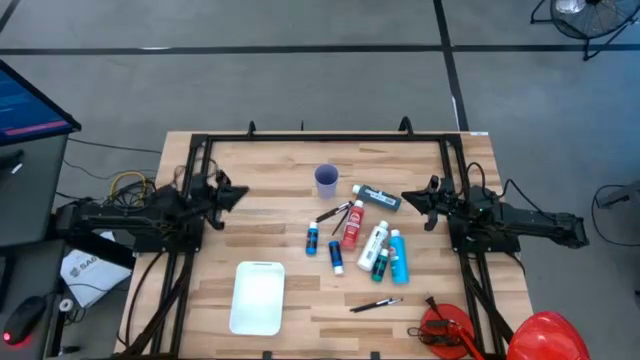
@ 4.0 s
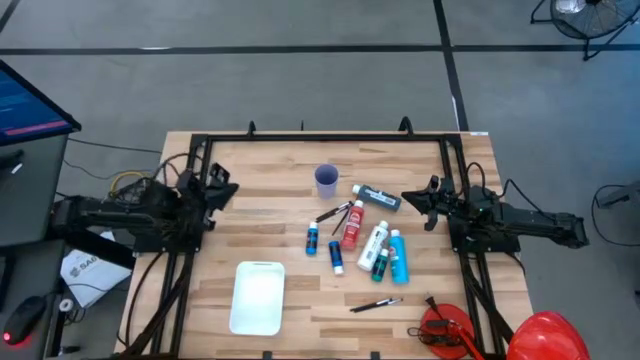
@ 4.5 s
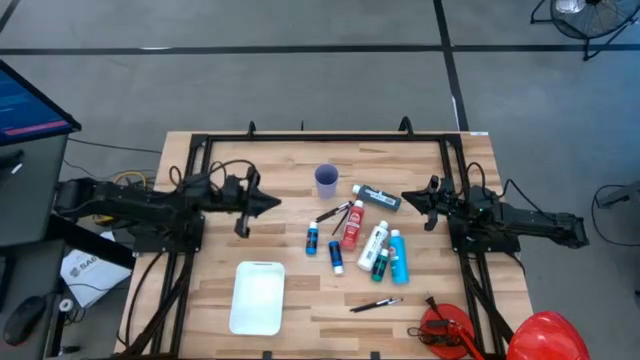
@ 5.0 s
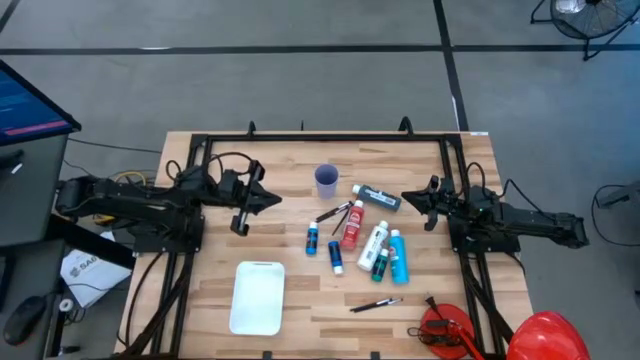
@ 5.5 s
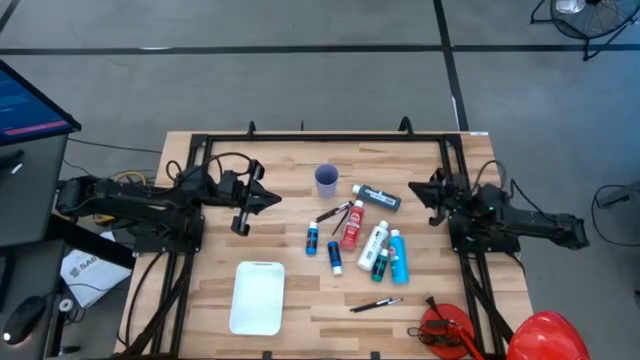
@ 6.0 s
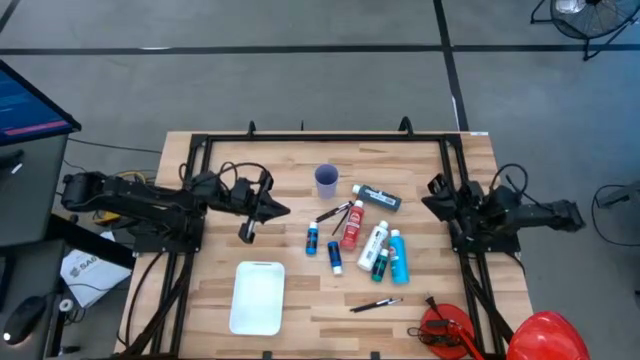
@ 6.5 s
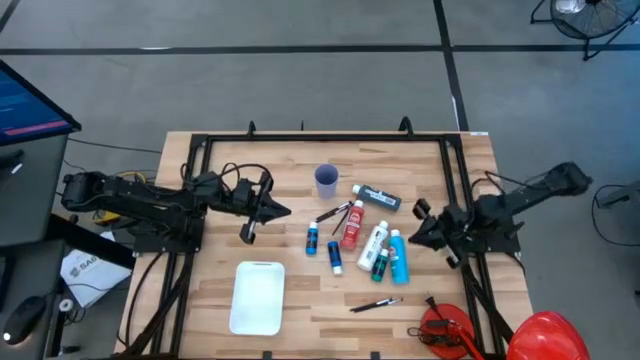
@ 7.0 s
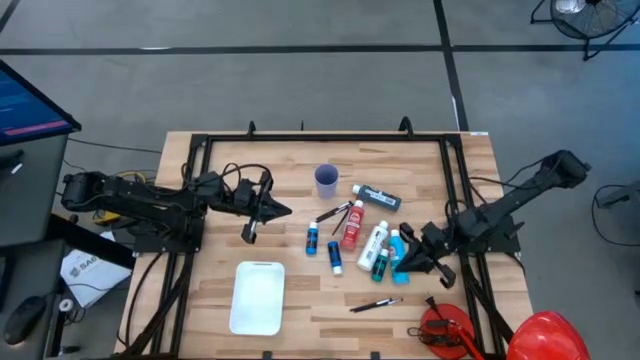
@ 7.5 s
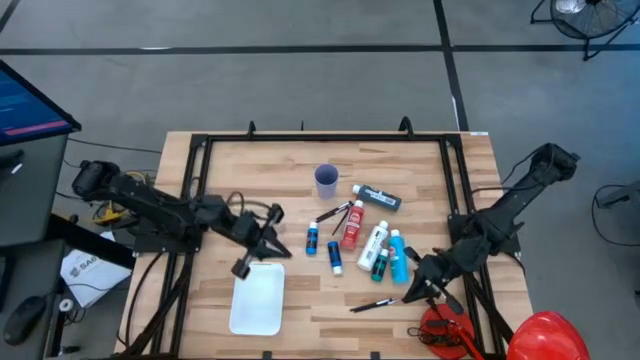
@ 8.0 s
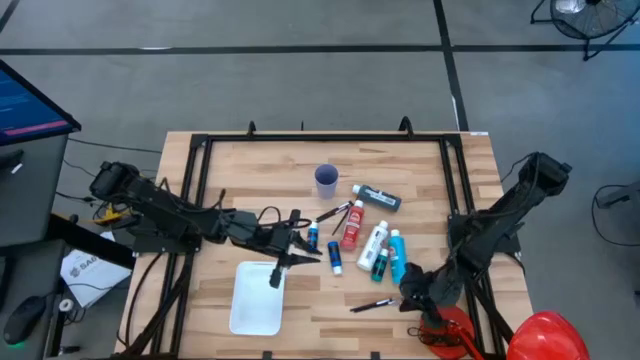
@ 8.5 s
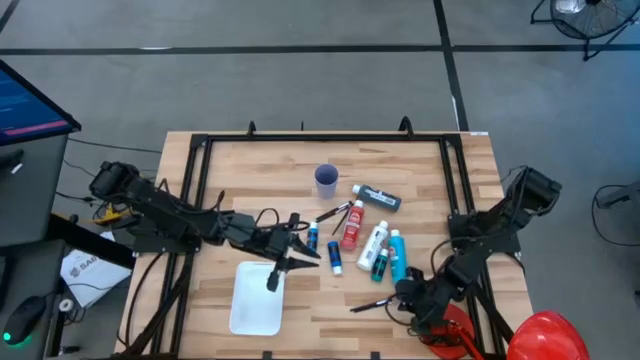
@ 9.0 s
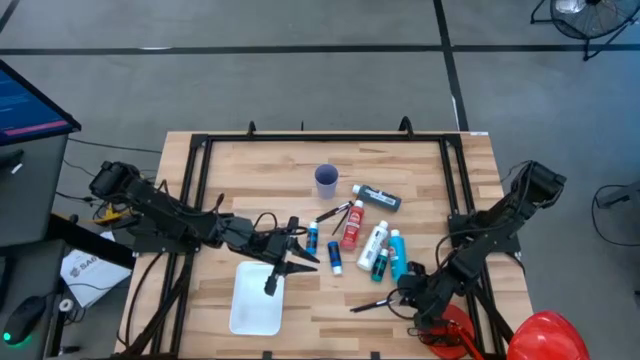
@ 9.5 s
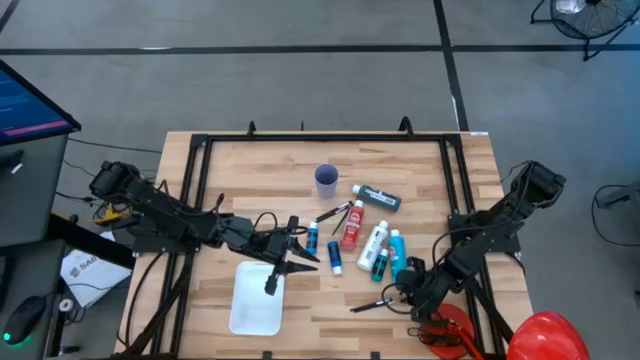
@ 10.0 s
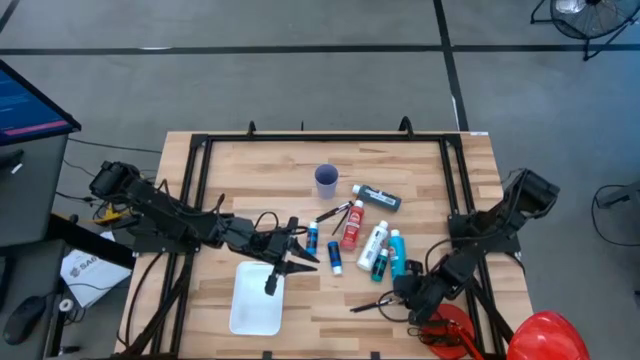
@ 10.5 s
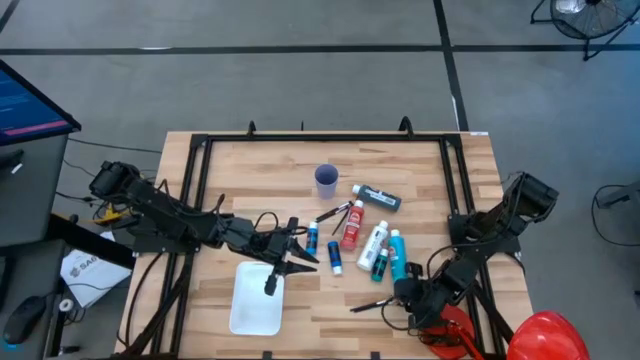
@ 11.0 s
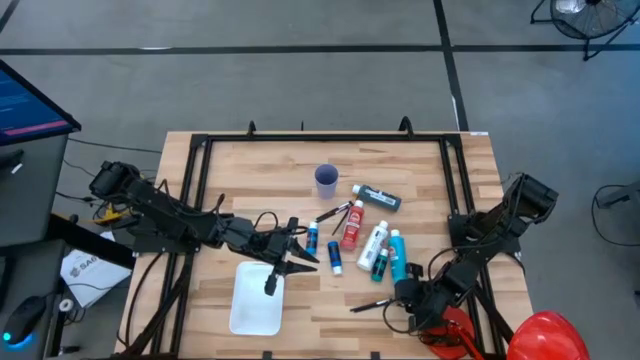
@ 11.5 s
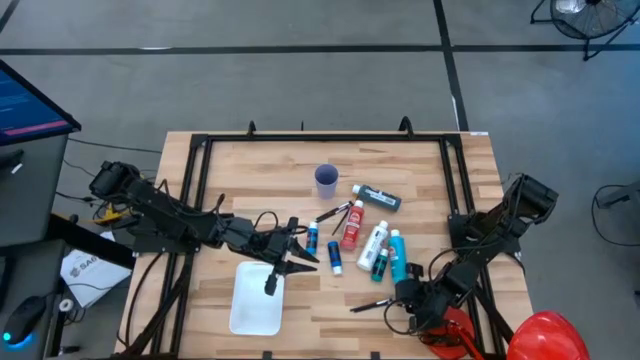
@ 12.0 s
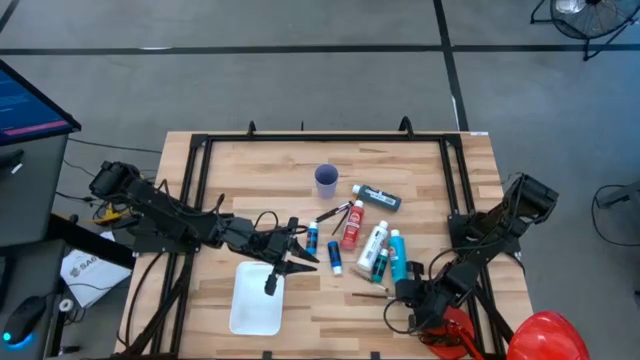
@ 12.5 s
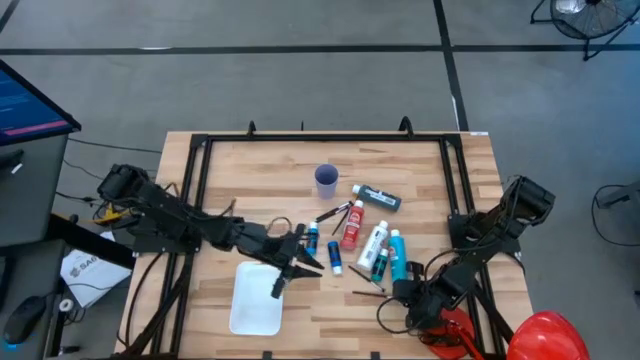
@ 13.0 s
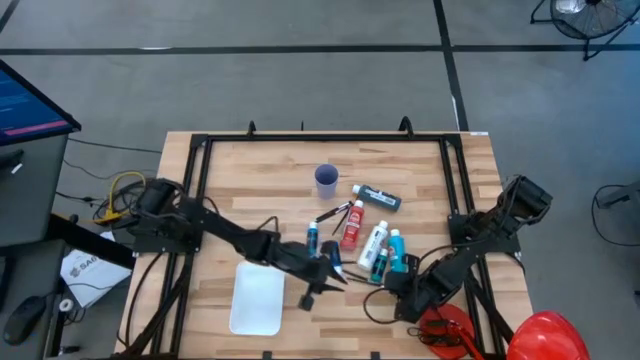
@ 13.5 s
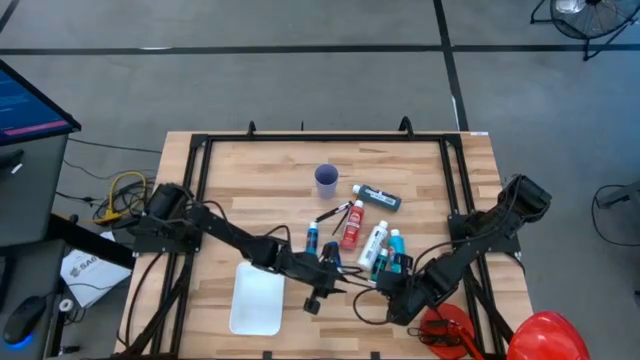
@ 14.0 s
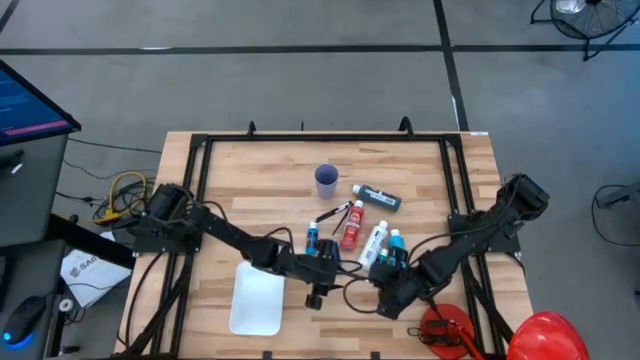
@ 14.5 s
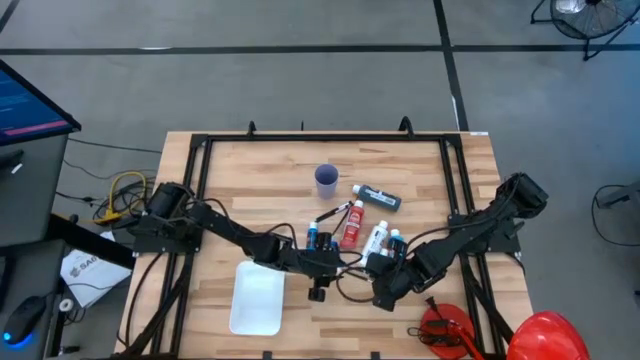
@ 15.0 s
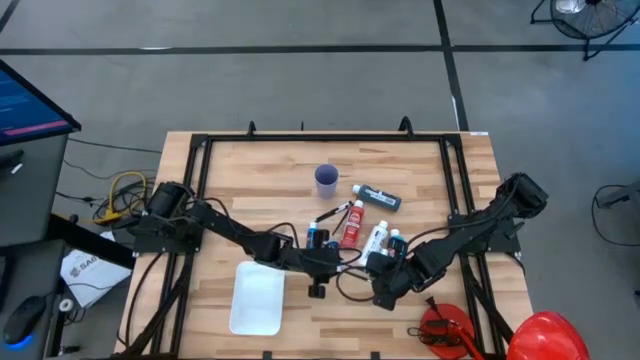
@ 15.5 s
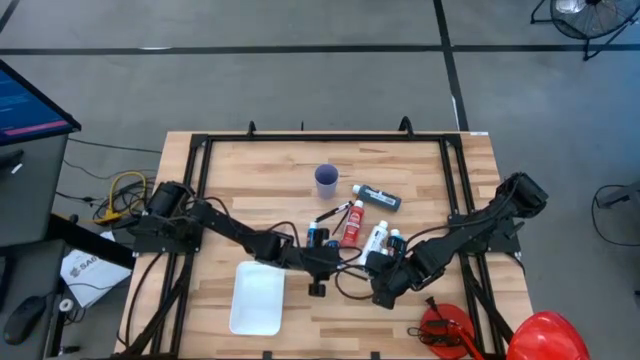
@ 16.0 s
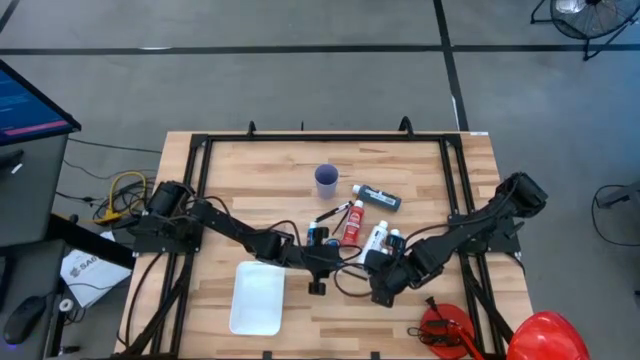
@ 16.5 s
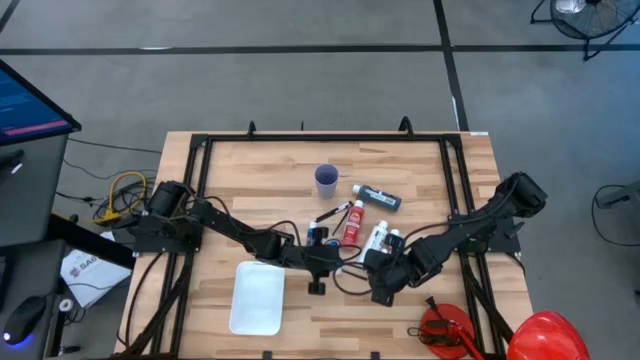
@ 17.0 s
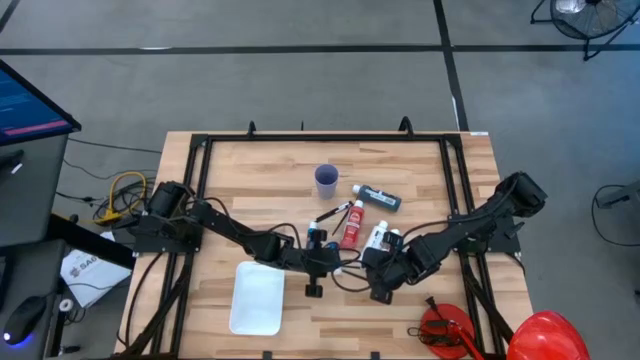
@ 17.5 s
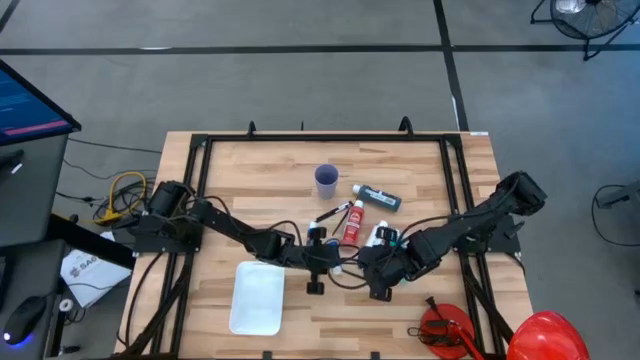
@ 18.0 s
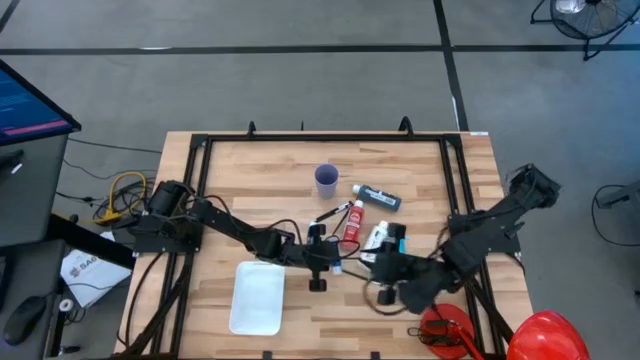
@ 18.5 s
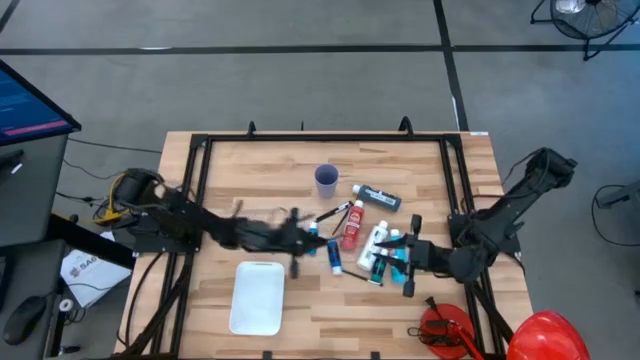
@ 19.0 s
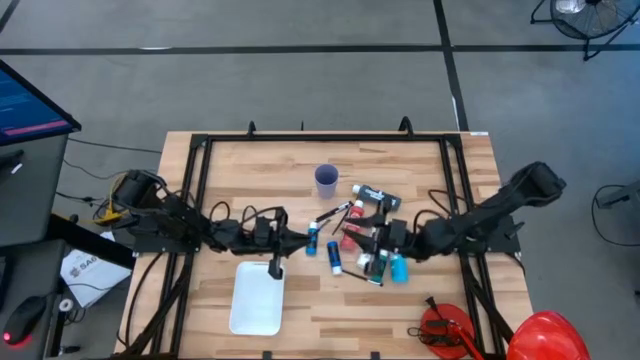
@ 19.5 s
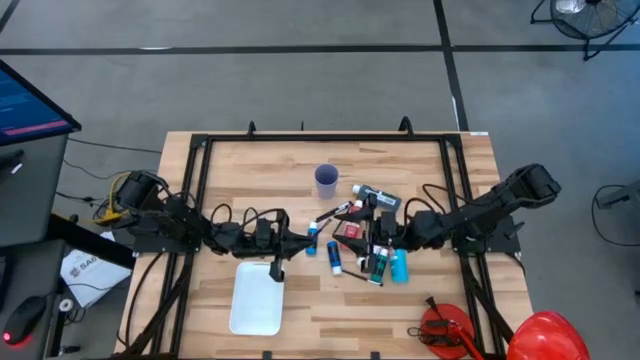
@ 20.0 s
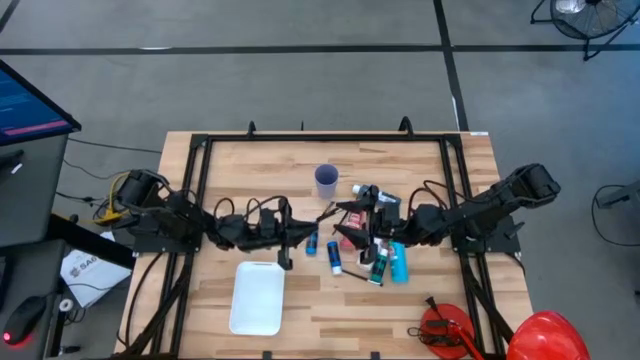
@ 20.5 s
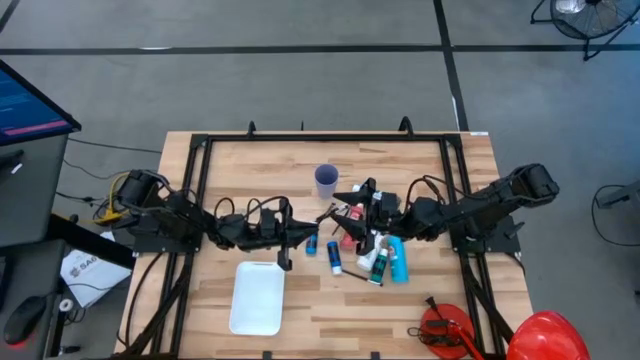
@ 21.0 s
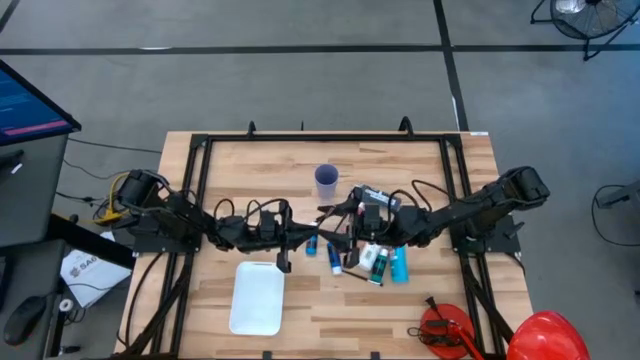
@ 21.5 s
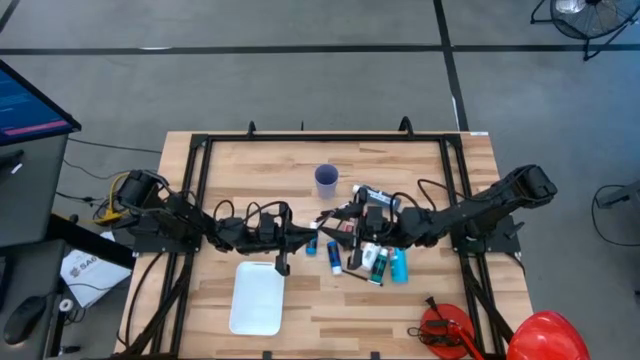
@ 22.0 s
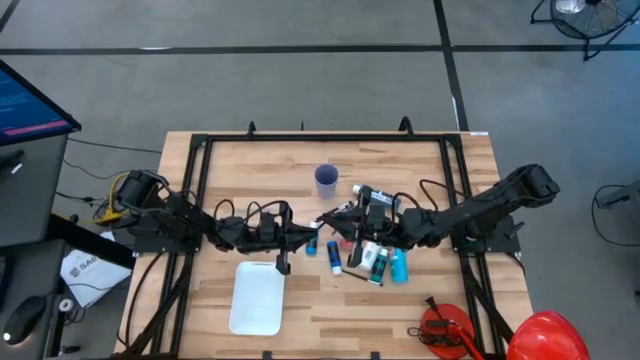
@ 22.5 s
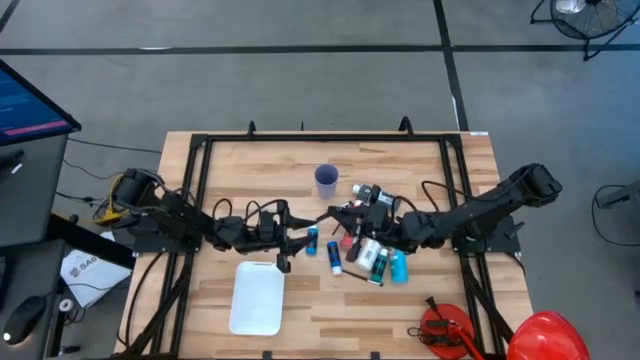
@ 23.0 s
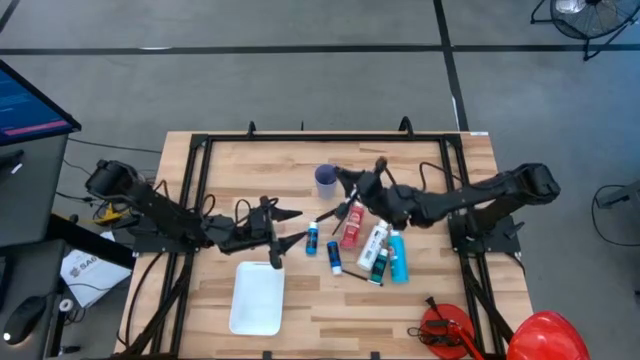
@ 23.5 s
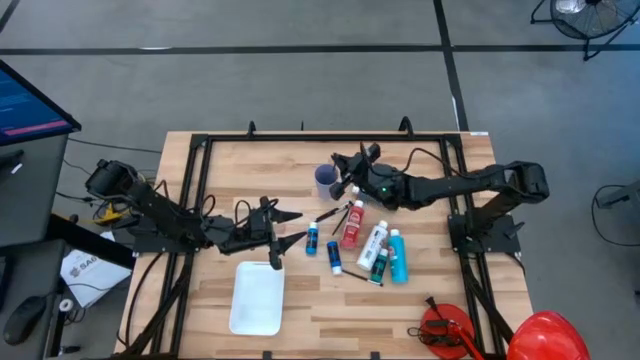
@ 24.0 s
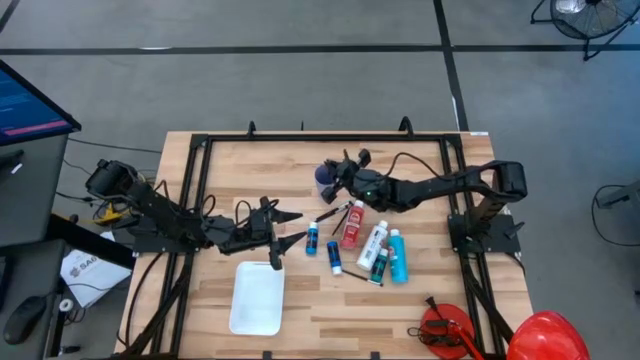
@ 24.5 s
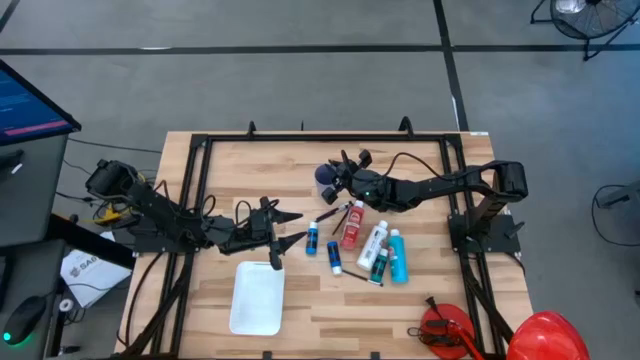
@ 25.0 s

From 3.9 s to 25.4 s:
Task: Pick & Place Paint Supplies
Put the silver paint brush into the violet cup
